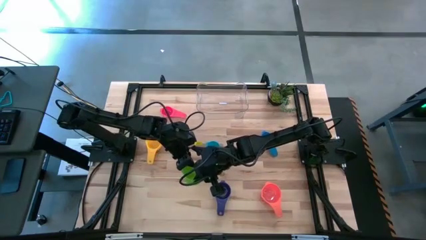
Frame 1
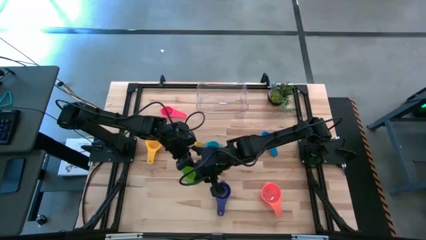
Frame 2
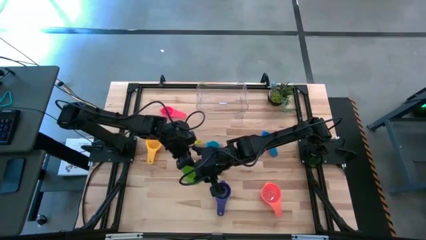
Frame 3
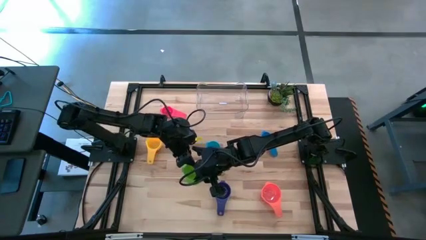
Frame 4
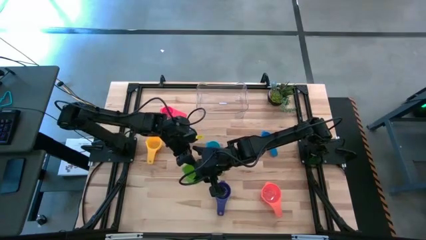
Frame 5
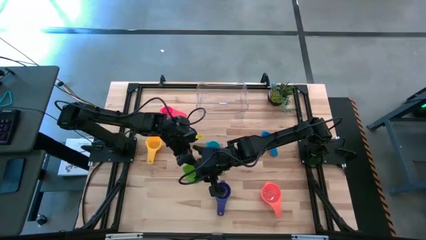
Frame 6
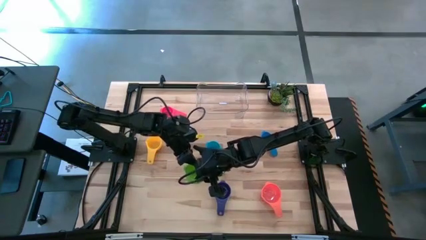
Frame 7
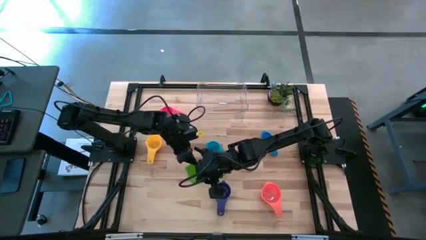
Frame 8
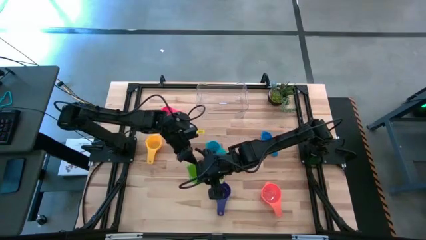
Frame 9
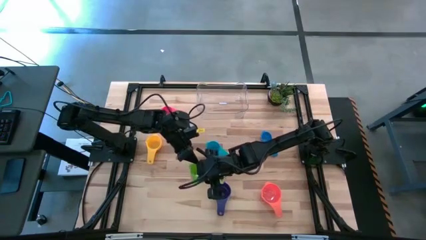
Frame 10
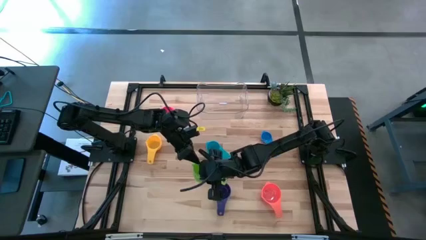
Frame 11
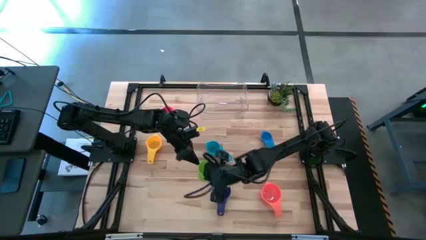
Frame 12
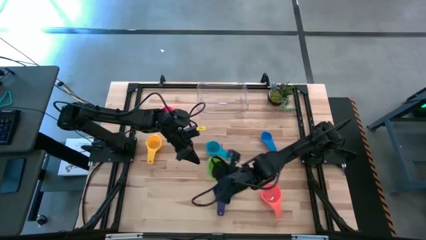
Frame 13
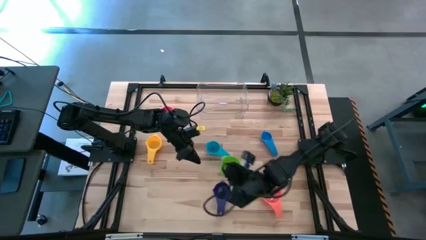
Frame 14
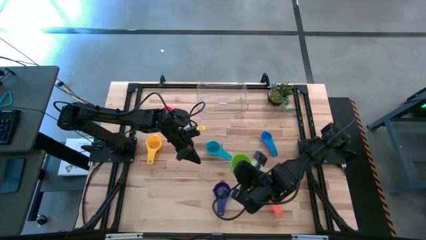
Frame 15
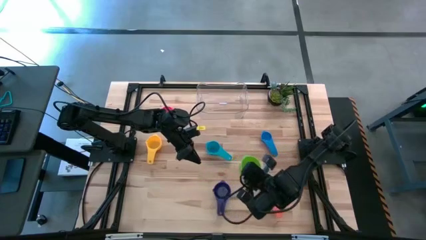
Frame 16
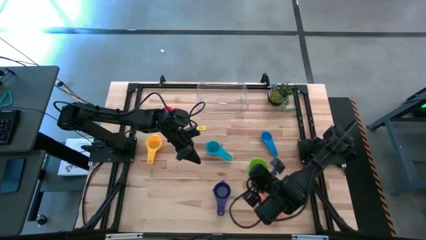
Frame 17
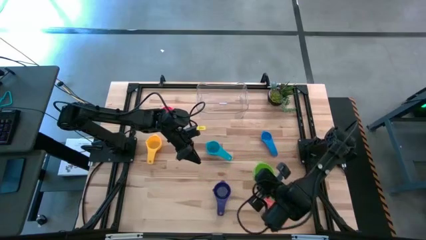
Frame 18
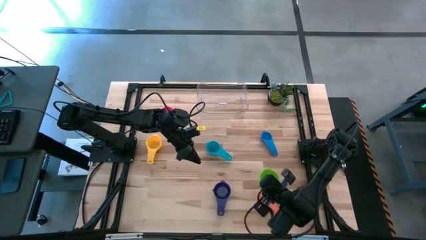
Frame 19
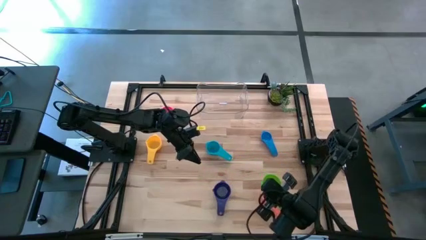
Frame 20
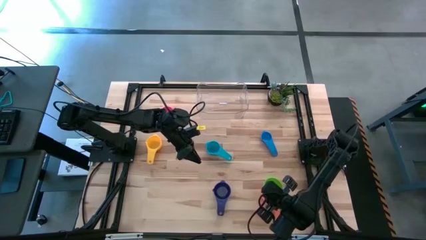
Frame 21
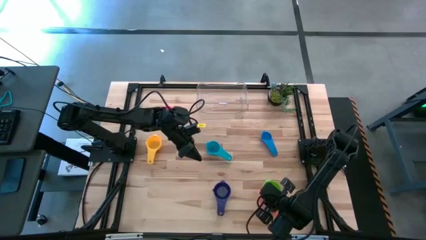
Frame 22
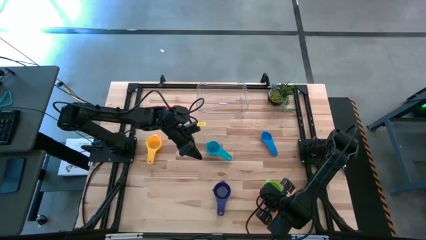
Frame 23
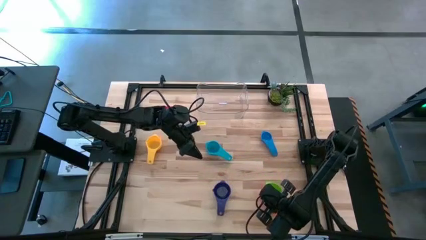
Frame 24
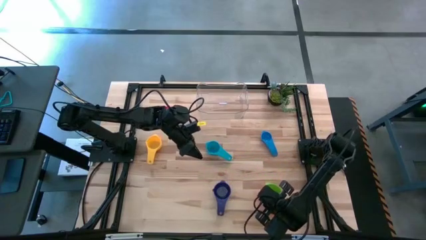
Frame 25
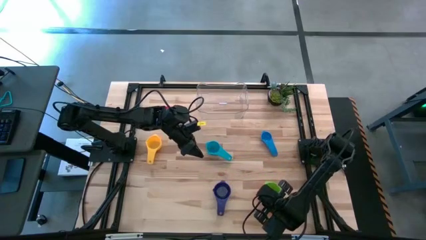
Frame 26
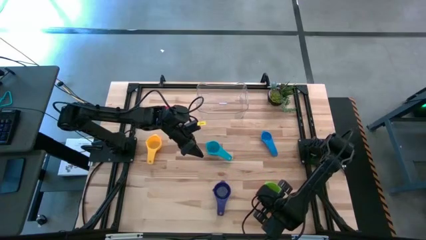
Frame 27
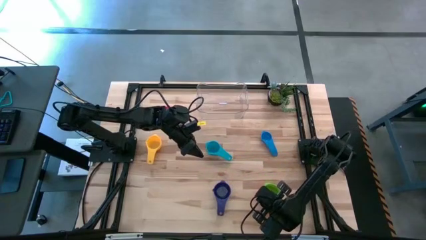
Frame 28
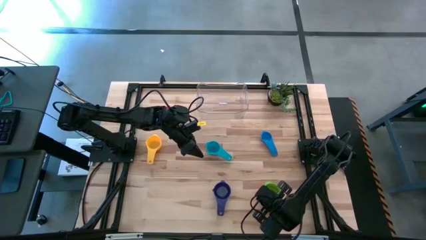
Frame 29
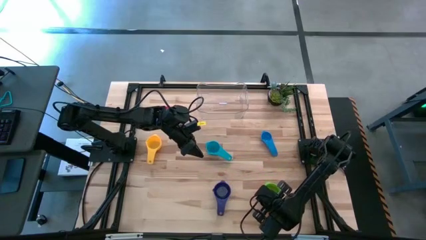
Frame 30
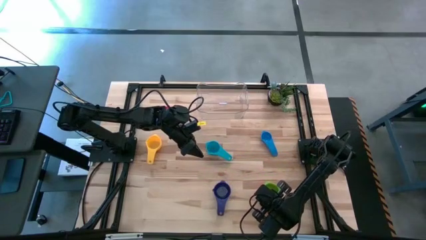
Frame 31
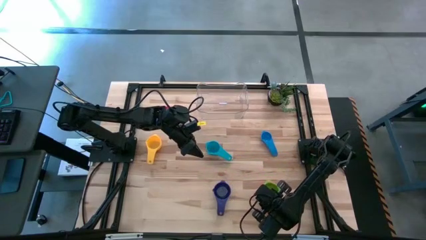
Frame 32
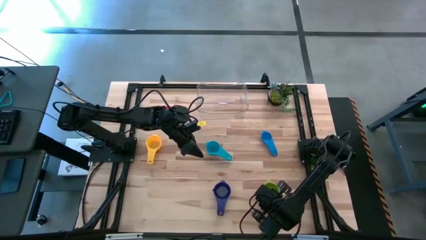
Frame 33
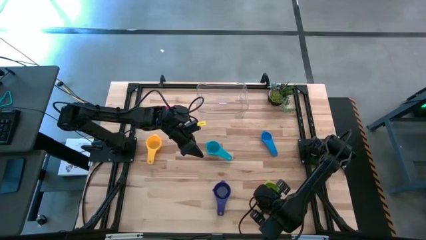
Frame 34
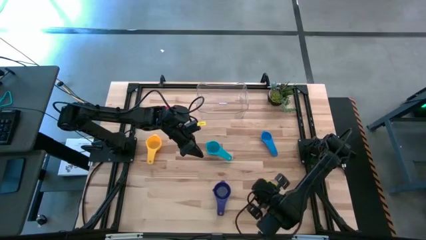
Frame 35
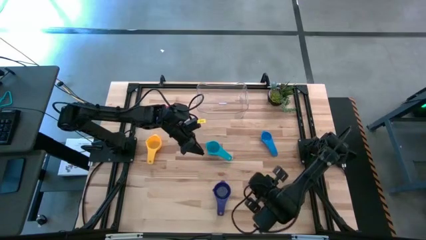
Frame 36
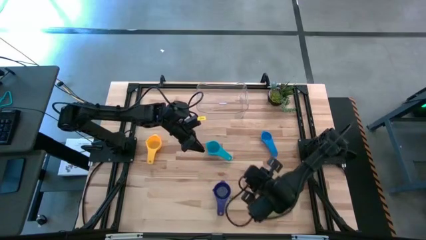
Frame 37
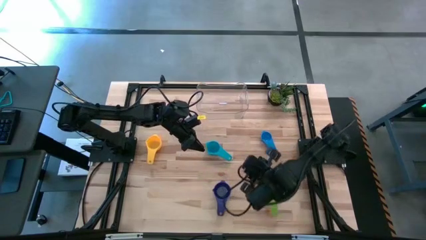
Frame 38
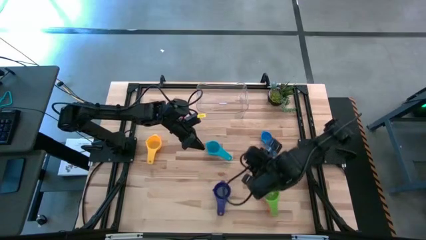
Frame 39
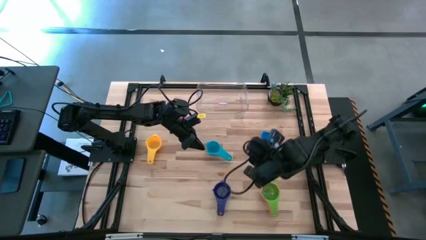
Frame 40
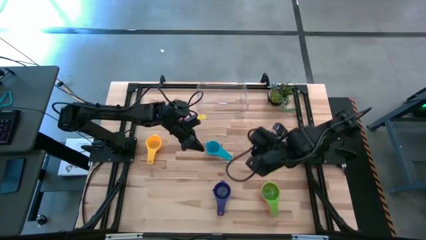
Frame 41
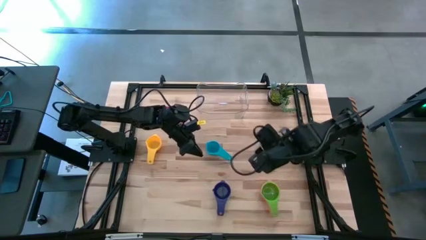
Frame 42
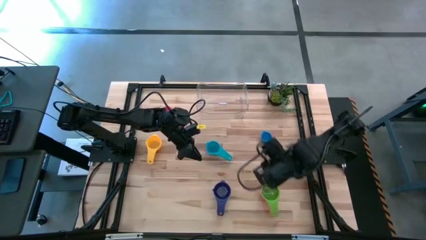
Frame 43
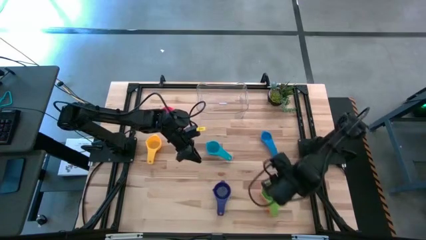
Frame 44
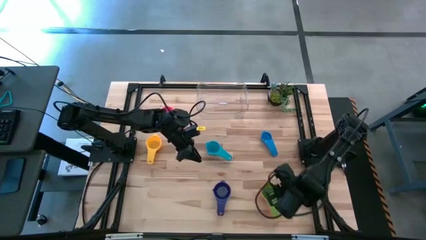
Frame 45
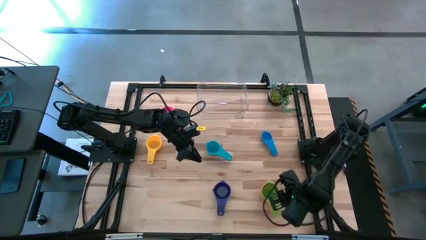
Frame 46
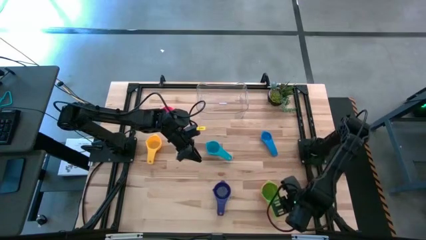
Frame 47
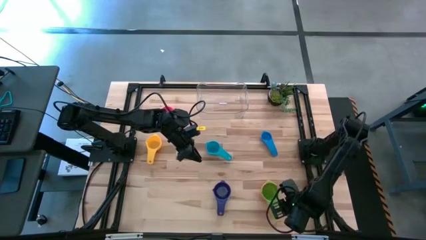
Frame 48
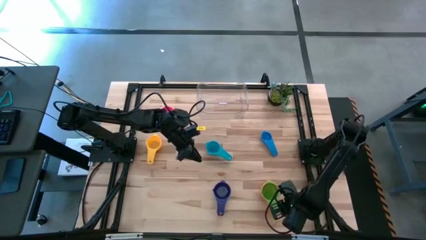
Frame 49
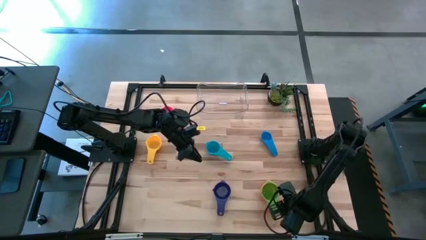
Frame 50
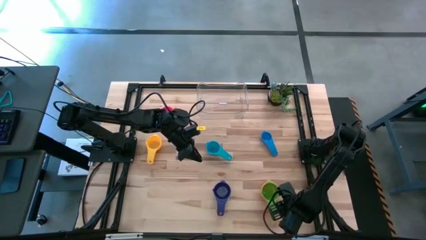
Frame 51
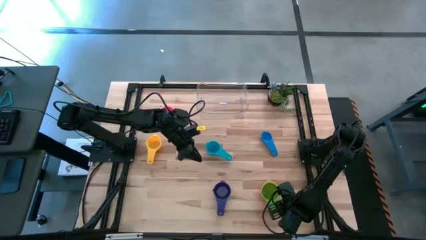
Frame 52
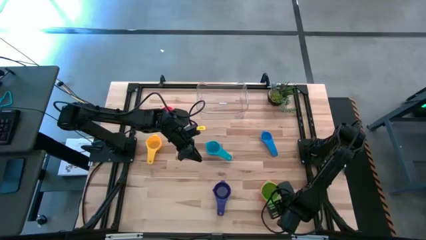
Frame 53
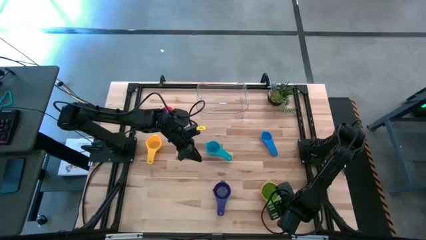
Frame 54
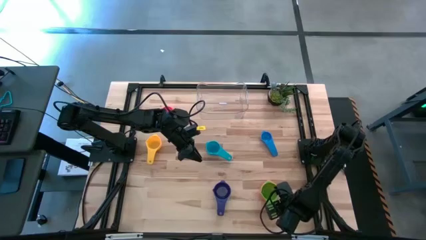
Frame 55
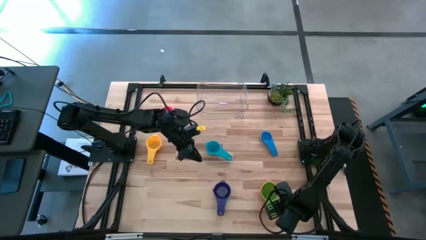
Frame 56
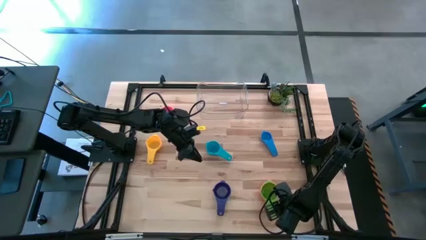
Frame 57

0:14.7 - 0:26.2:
Task: Nest measuring cups in basket
Stack the green measuring cup on top of the orange measuring cup

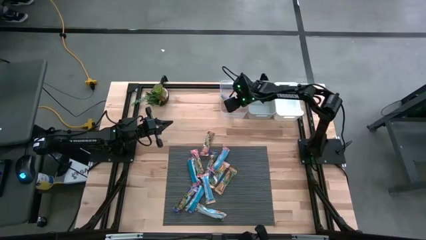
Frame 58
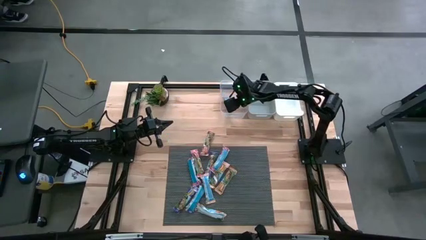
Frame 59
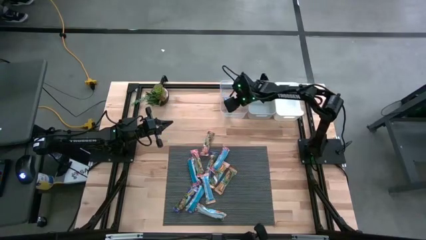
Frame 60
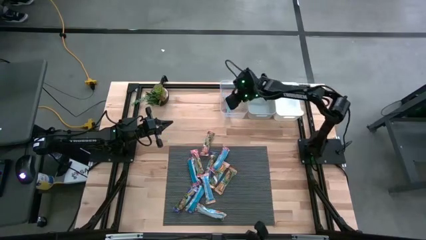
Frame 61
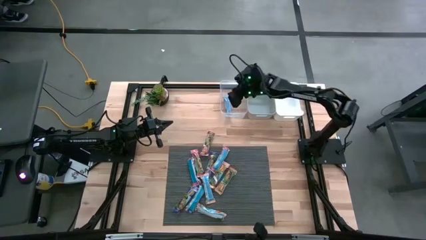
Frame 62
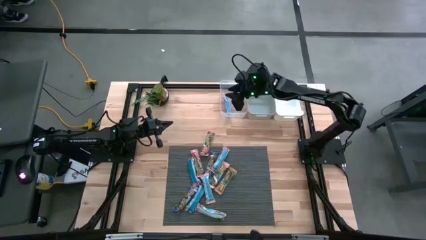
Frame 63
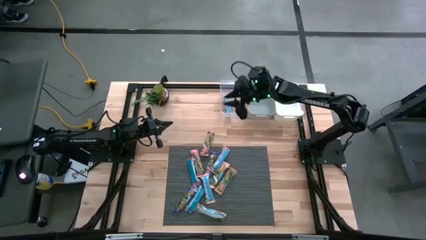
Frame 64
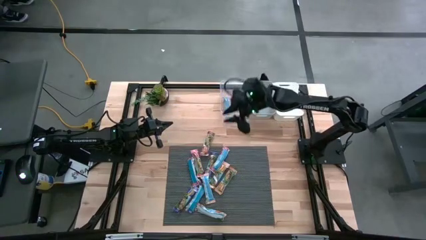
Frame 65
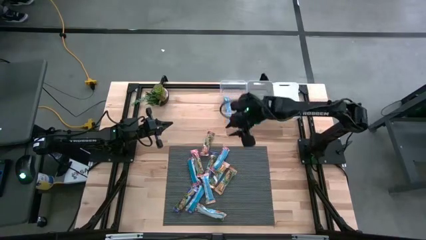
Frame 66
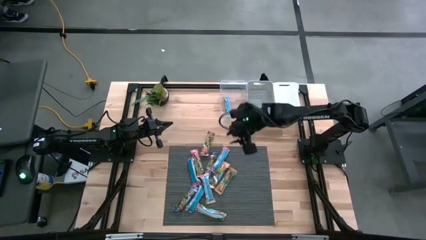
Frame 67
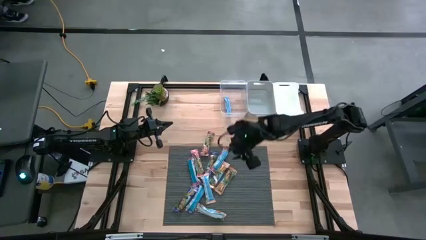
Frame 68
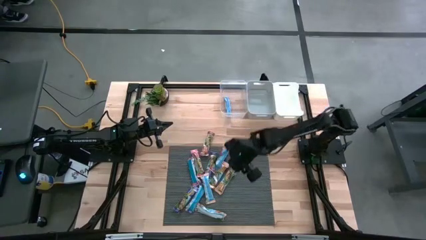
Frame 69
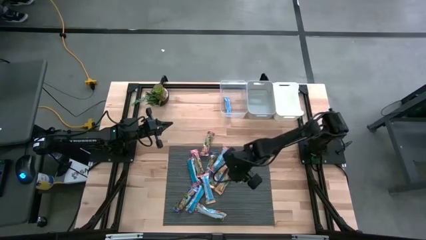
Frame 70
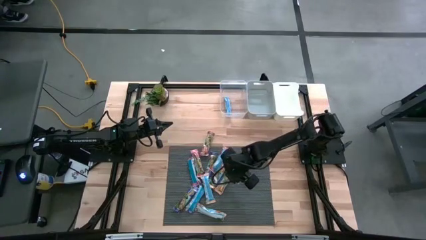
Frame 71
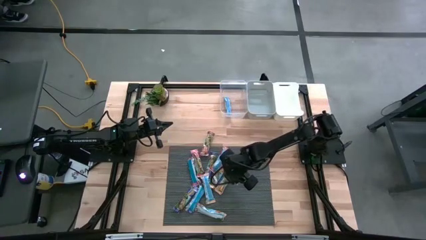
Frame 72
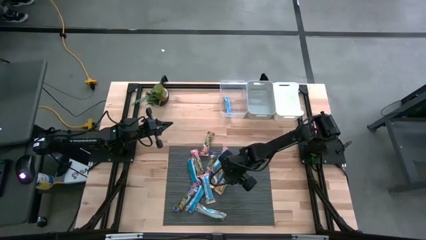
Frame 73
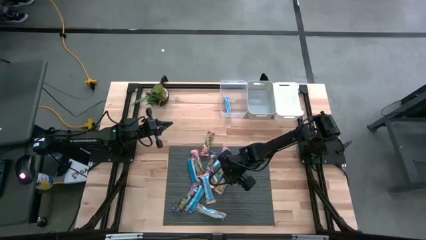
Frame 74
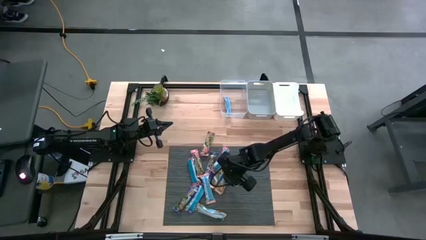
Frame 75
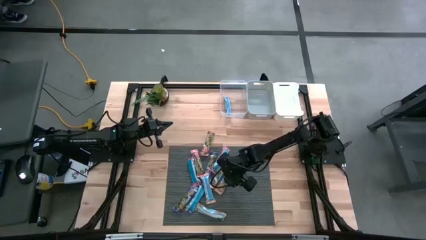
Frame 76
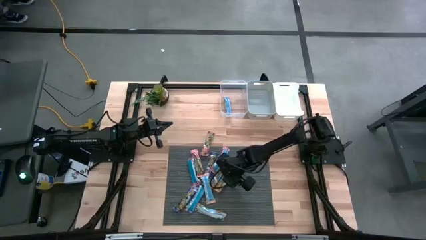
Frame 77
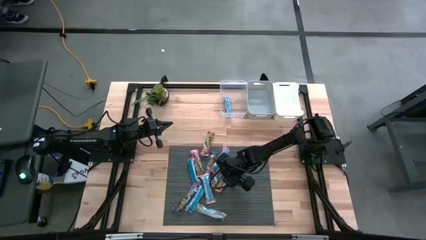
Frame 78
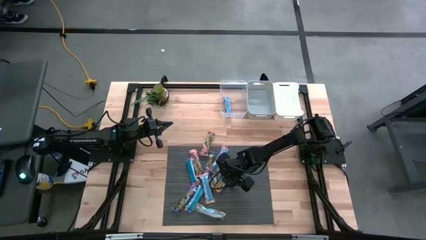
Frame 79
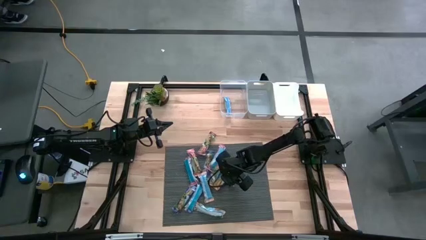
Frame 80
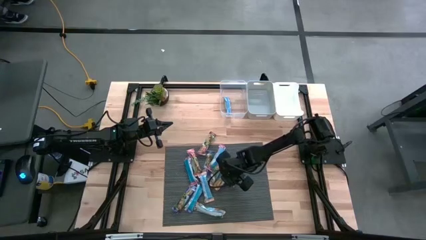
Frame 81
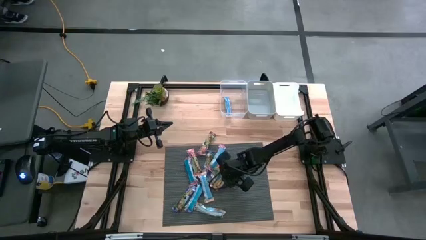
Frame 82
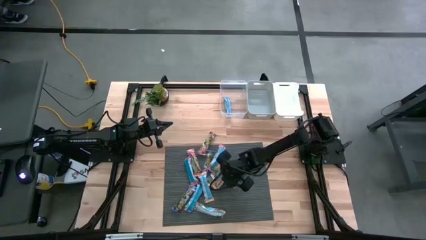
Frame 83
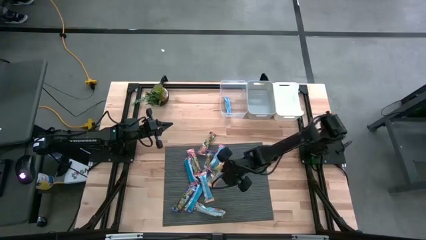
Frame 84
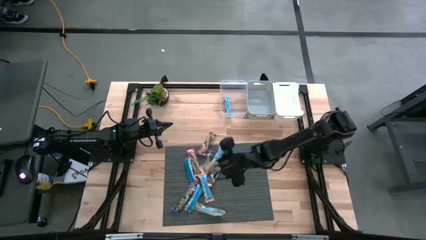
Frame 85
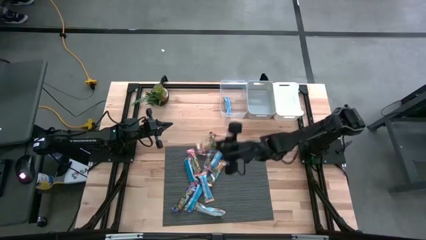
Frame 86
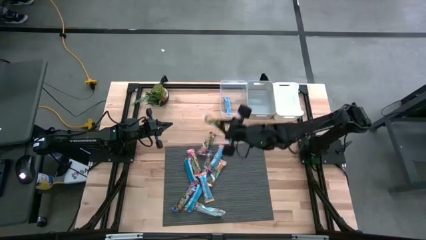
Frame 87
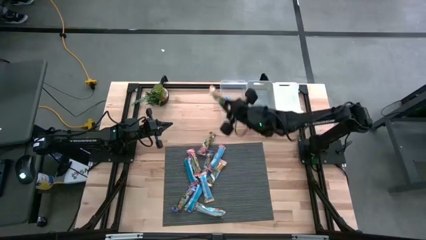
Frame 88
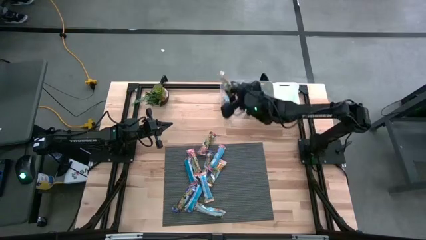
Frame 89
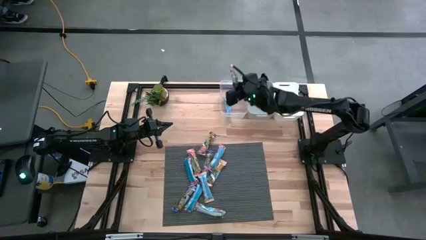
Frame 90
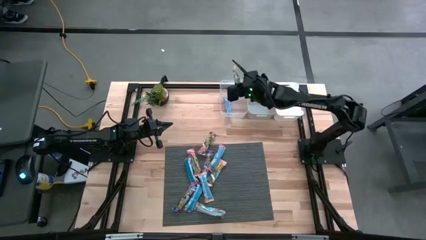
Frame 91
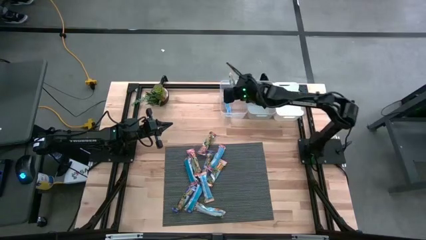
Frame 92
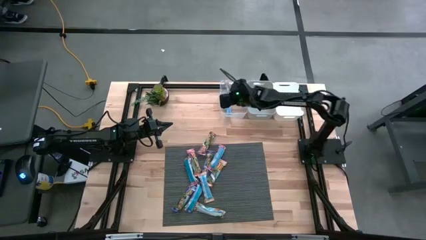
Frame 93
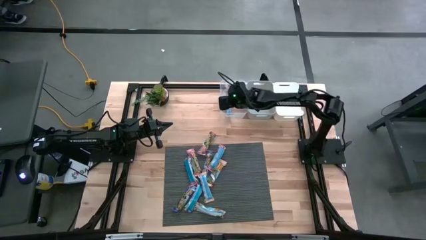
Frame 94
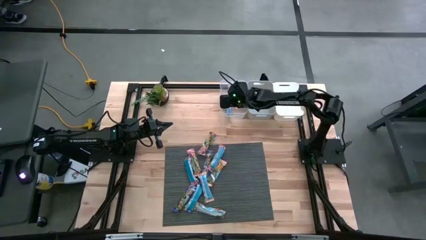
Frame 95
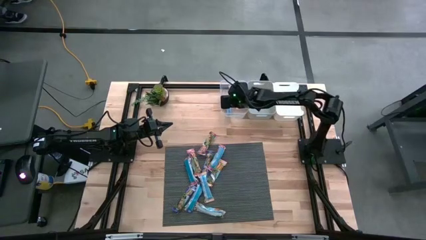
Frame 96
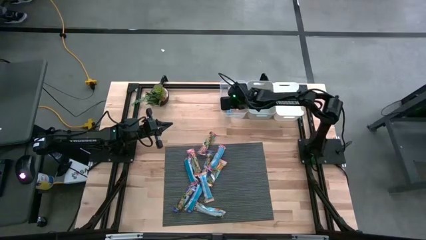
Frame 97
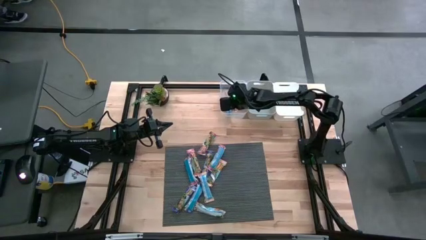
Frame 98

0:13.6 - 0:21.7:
Task: Pick and place Granola Bars by type
Put the yellow granola bar into the transparent bin
